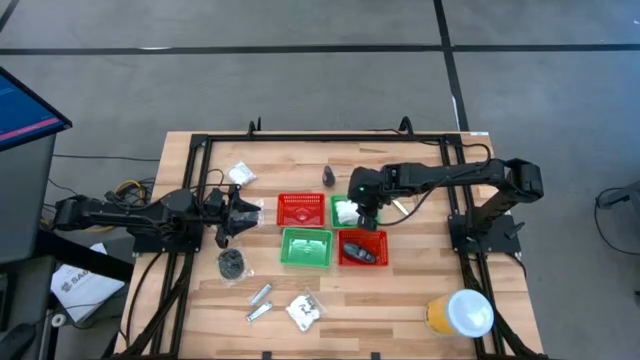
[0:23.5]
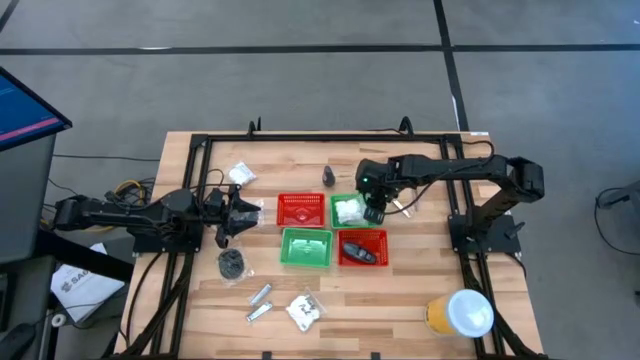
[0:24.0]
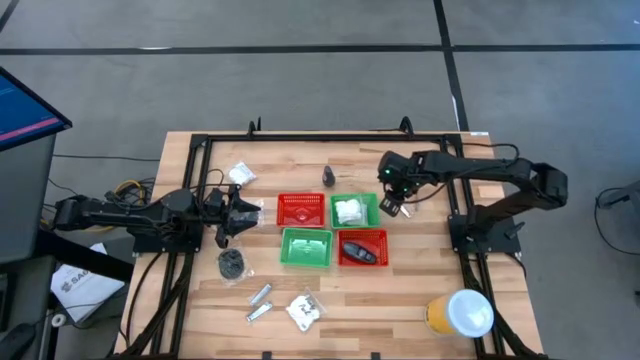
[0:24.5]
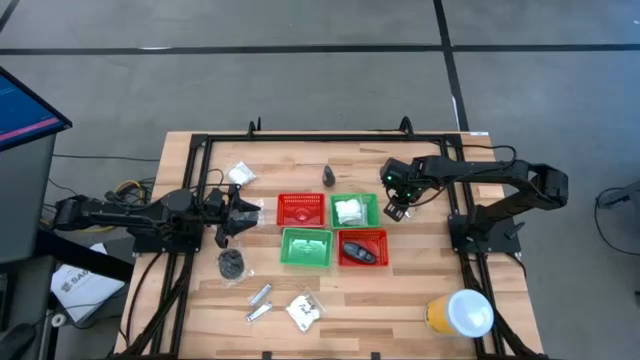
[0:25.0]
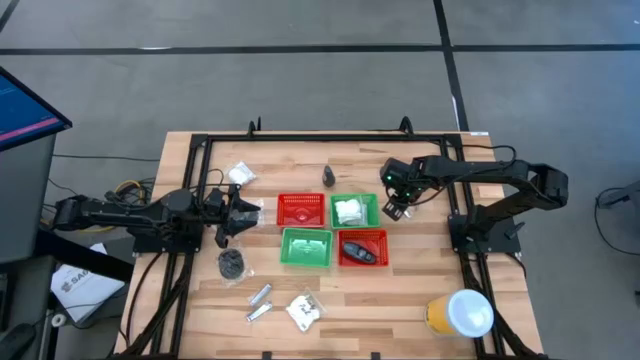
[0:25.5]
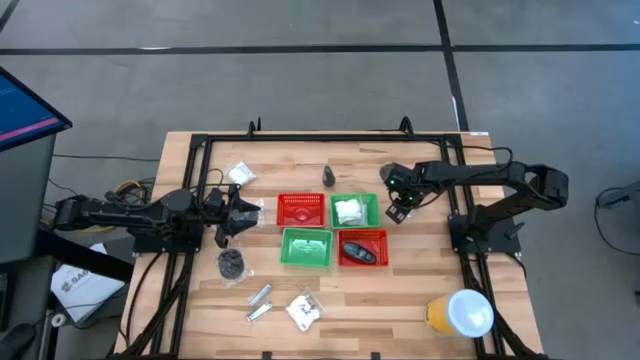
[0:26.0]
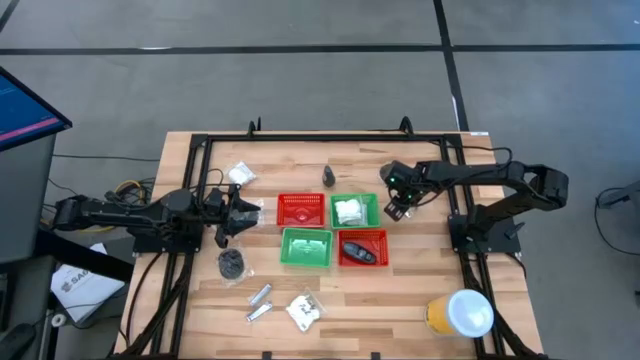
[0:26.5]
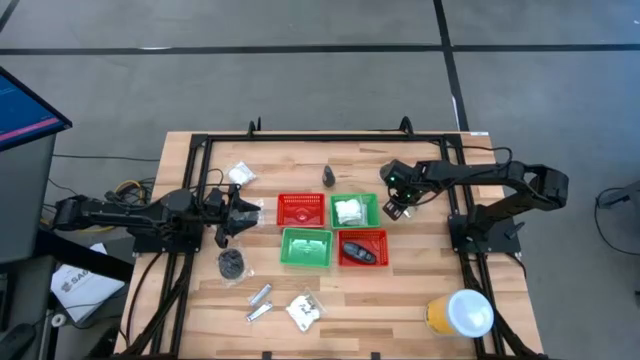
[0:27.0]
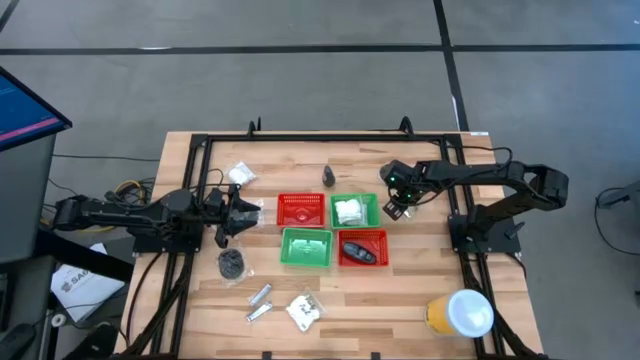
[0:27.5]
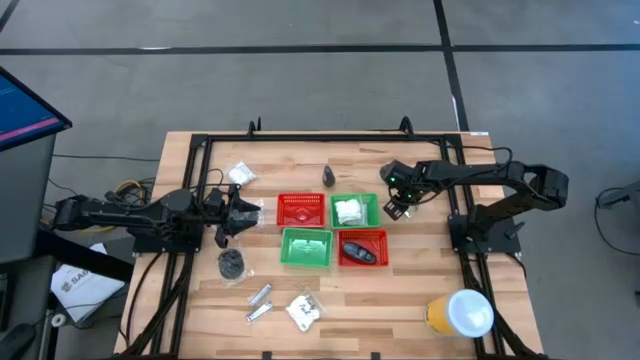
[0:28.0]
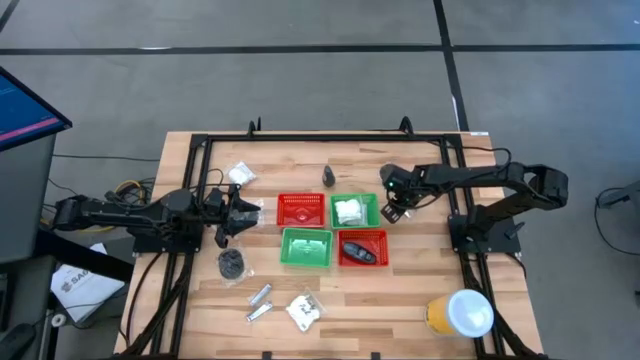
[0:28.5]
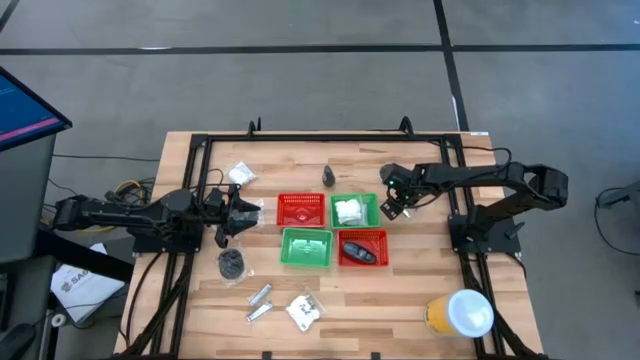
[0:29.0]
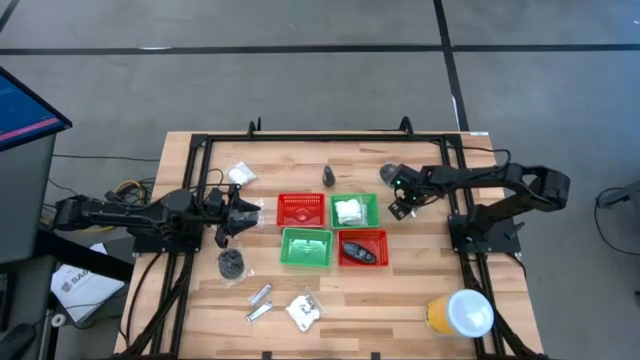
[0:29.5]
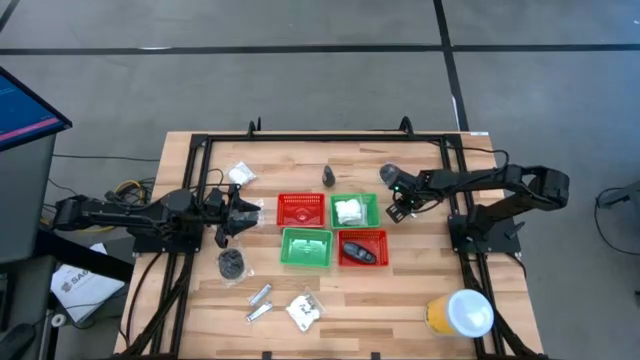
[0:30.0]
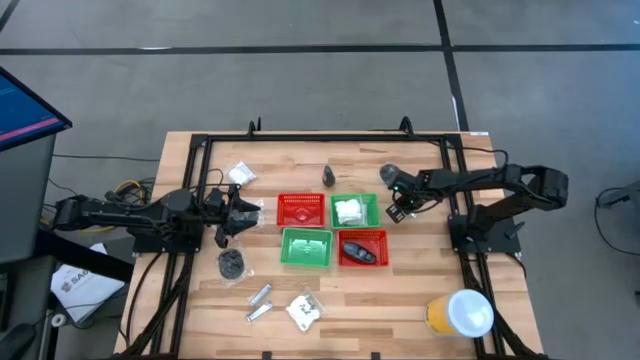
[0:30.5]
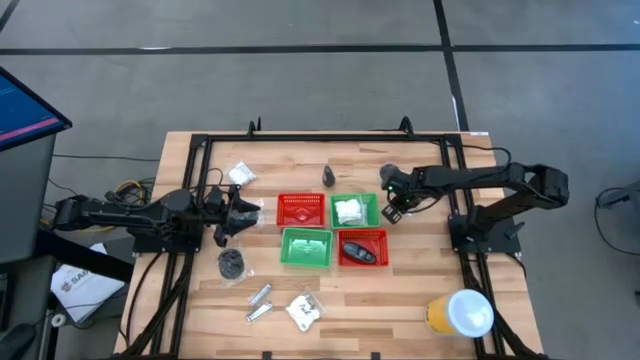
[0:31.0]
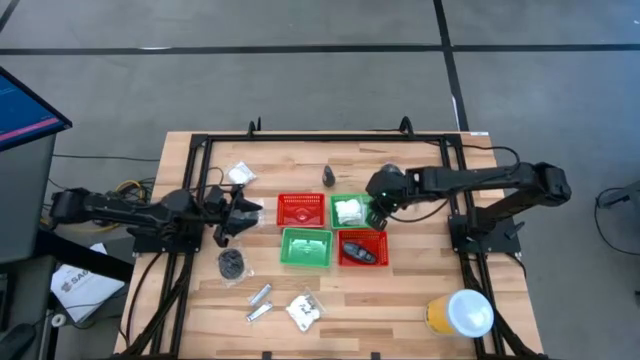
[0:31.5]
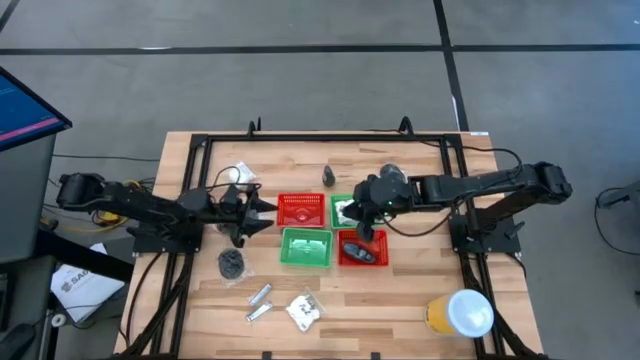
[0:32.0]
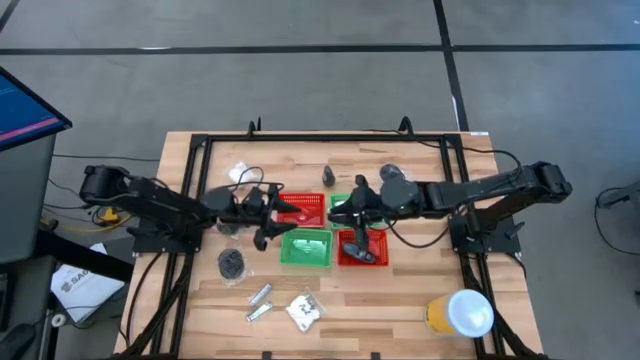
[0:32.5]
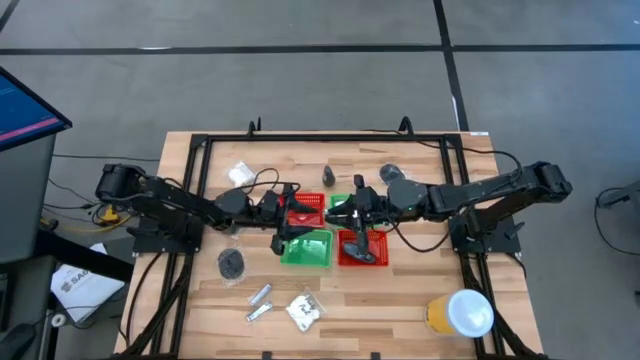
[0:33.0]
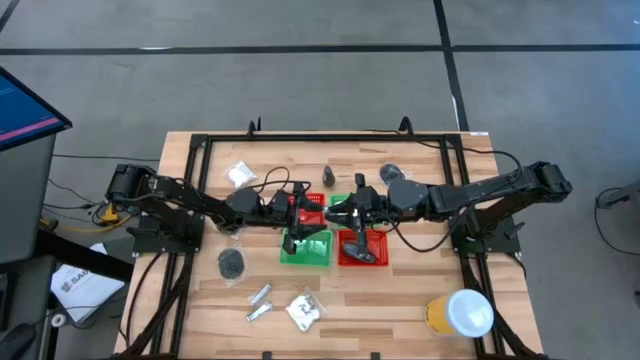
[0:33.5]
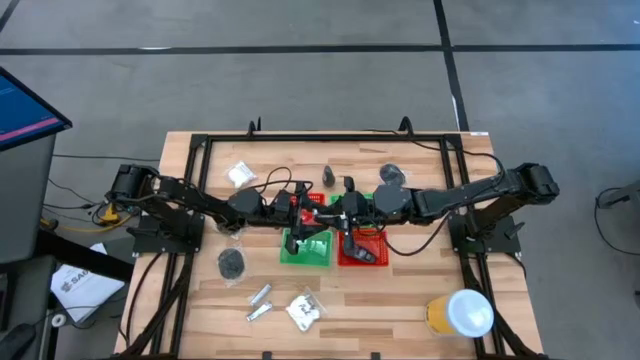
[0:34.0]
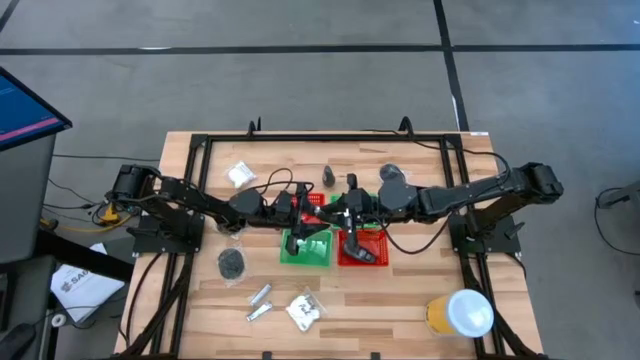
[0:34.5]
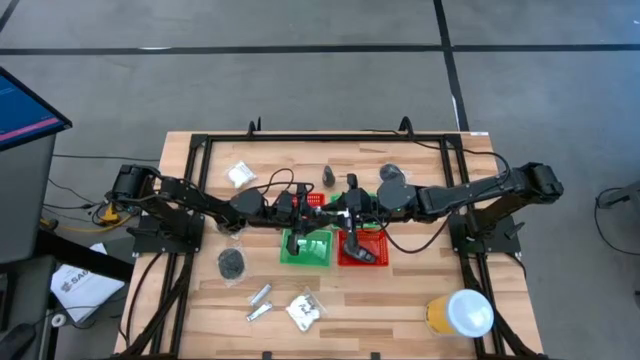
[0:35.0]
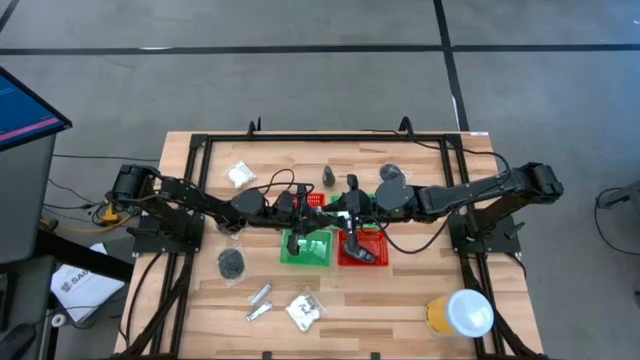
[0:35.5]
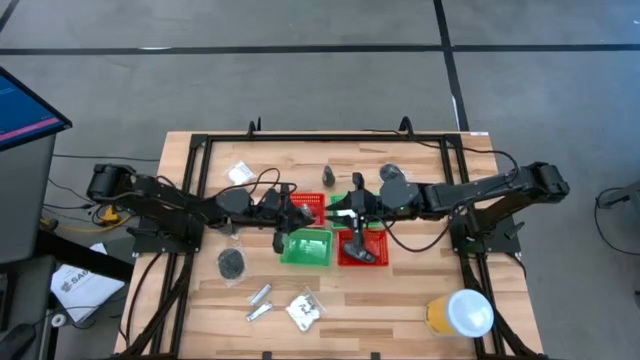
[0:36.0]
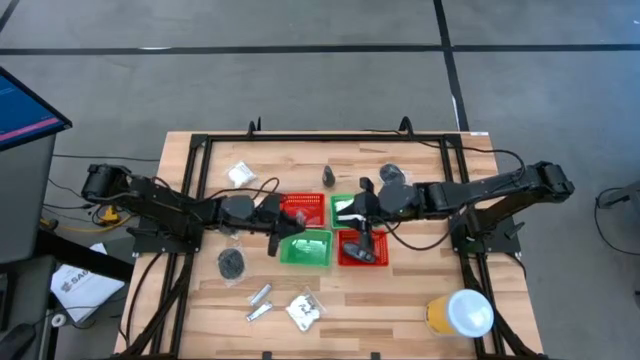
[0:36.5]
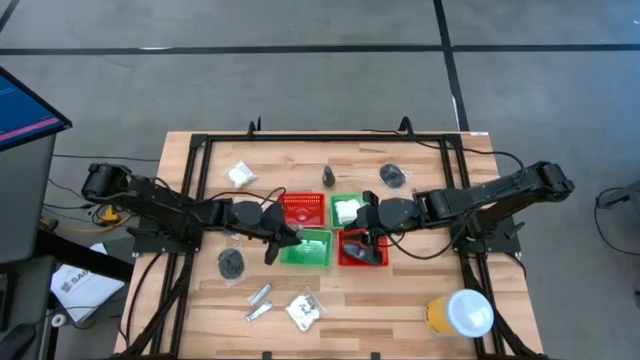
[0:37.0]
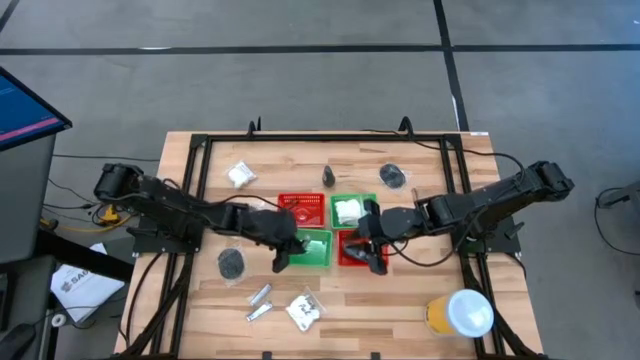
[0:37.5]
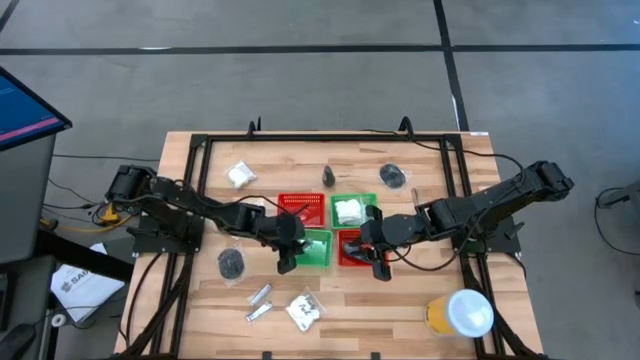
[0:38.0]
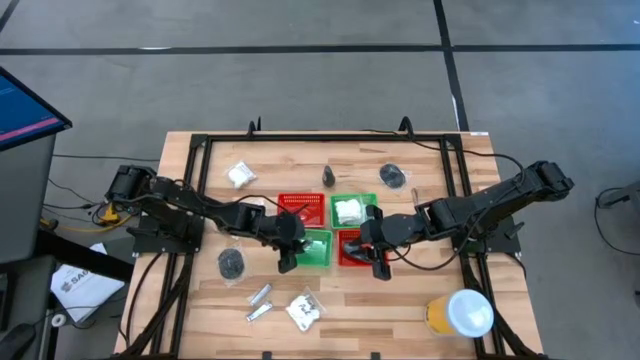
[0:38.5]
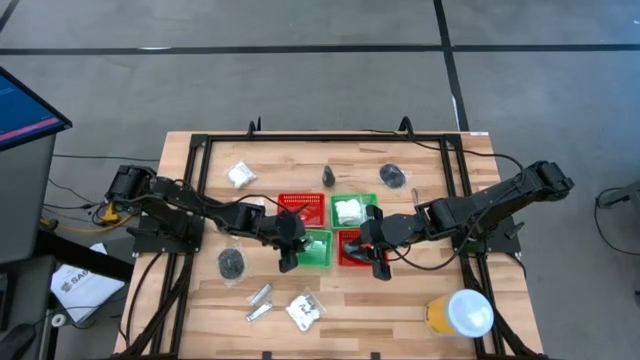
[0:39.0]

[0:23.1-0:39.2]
Task: Pick & Place Travel size toiletries
Put the silver nail cutter into the left green basket

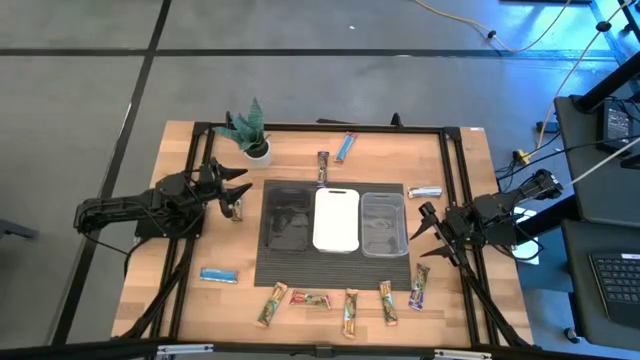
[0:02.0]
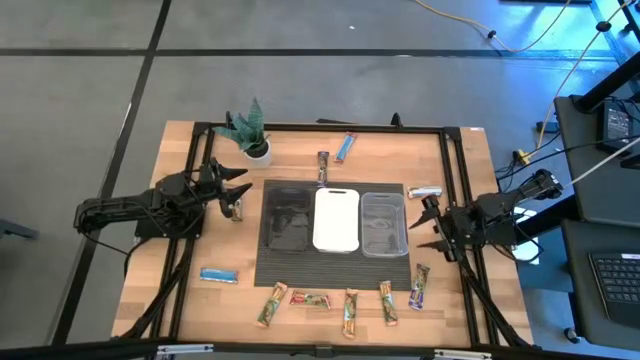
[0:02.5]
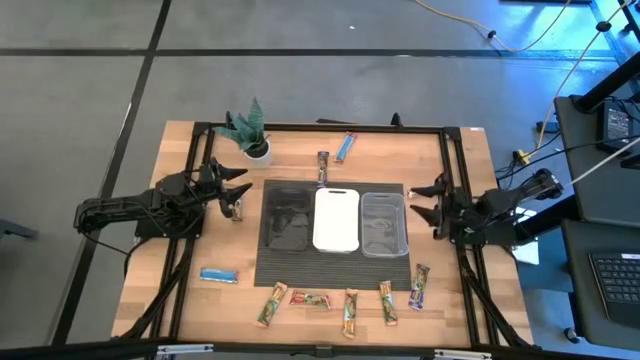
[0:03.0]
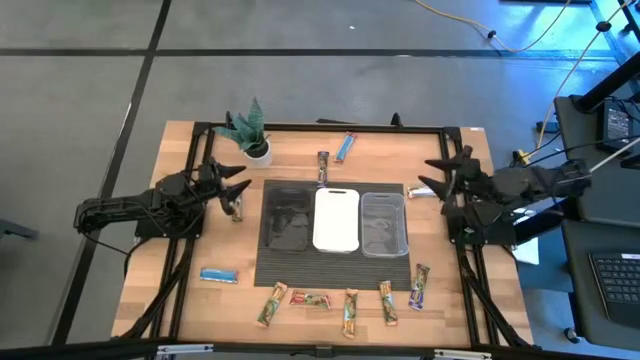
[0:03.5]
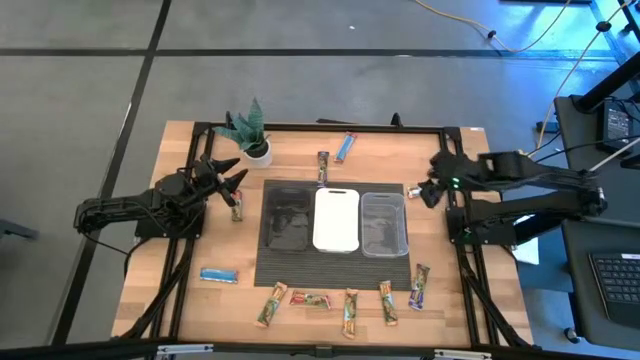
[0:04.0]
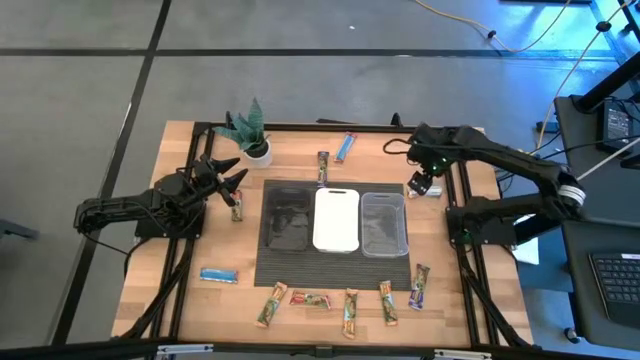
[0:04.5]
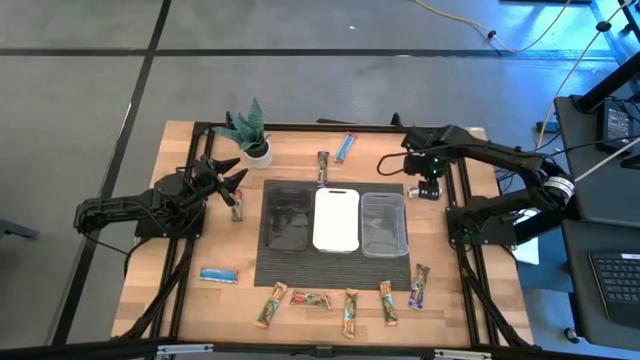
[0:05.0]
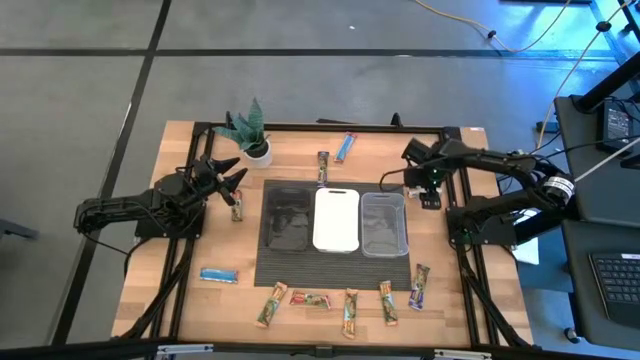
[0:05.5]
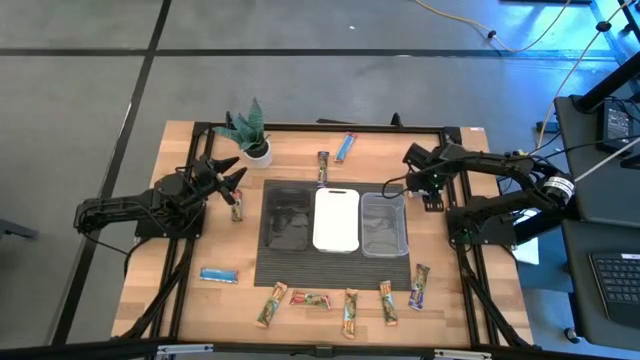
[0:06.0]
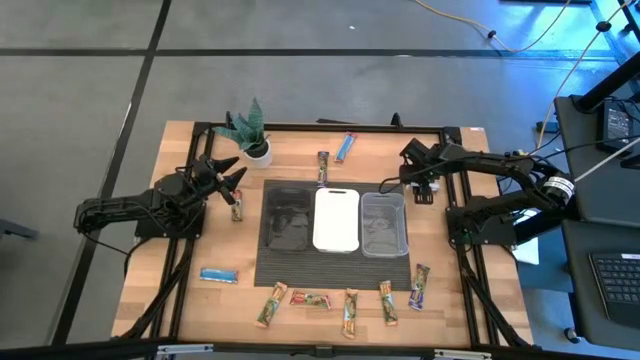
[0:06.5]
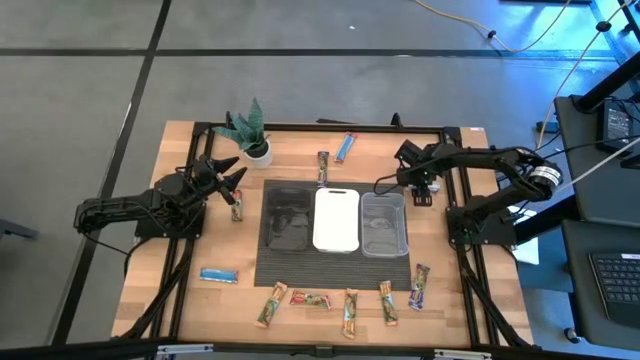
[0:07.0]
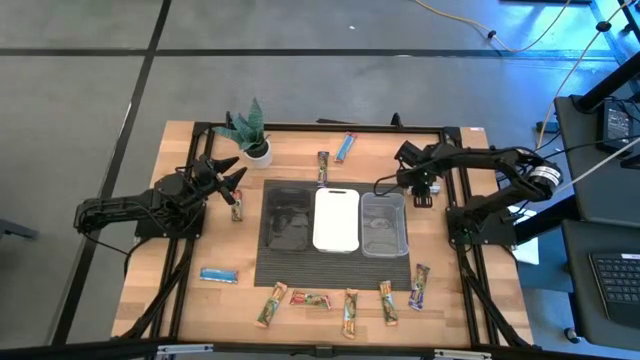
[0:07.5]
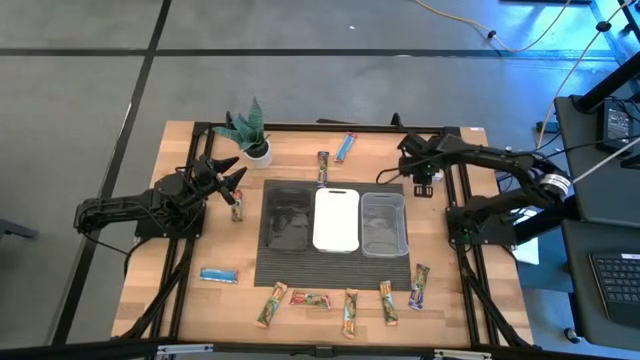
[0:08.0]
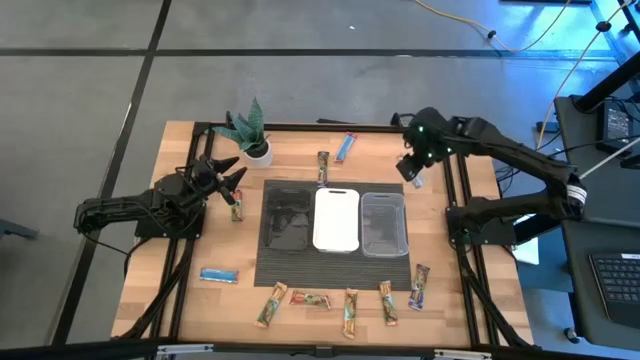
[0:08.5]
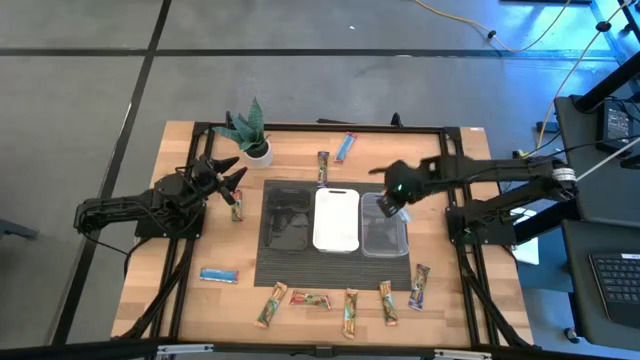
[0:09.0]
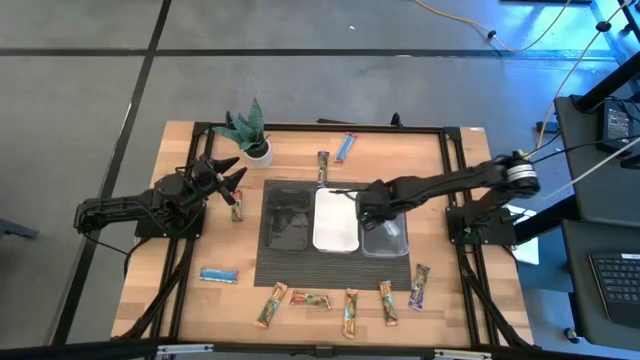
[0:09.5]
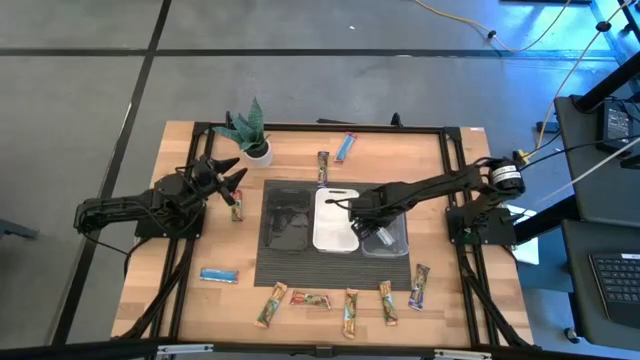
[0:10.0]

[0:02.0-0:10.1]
Task: Pick and place Granola Bars by type
Put the yellow granola bar into the transparent bin
